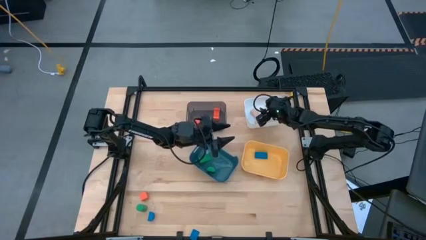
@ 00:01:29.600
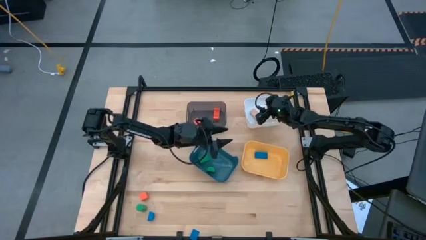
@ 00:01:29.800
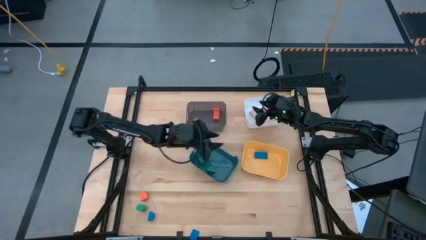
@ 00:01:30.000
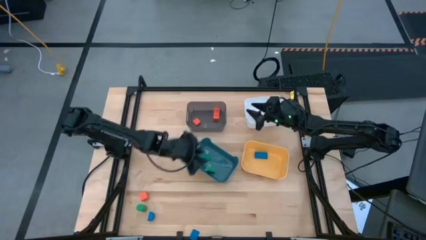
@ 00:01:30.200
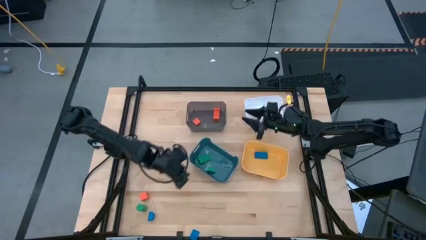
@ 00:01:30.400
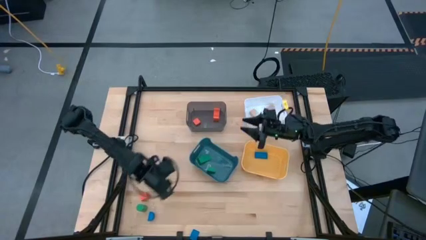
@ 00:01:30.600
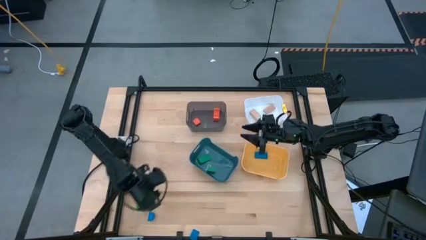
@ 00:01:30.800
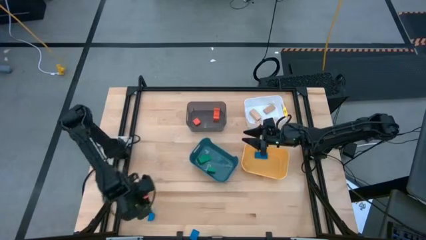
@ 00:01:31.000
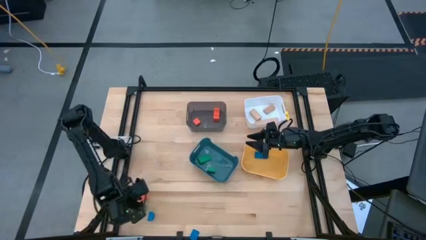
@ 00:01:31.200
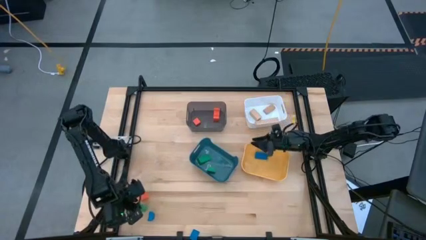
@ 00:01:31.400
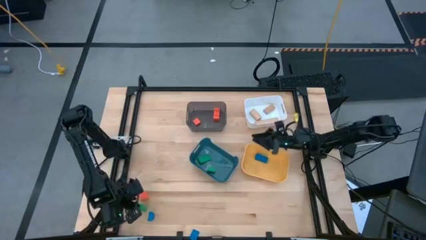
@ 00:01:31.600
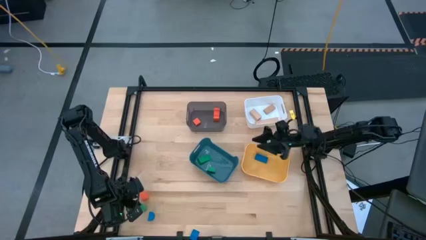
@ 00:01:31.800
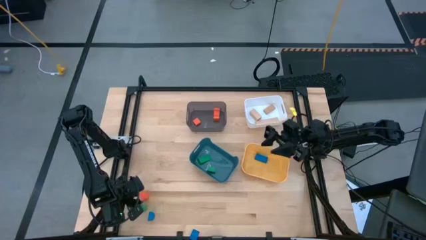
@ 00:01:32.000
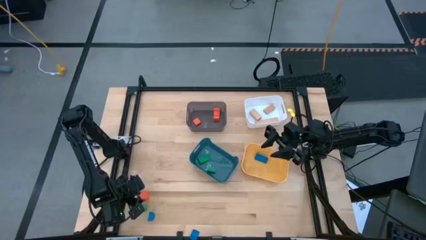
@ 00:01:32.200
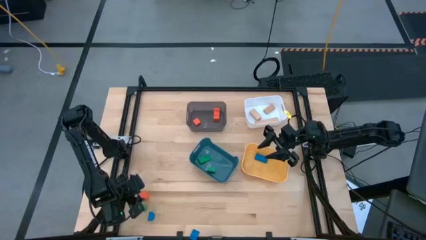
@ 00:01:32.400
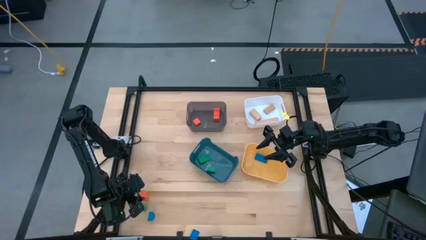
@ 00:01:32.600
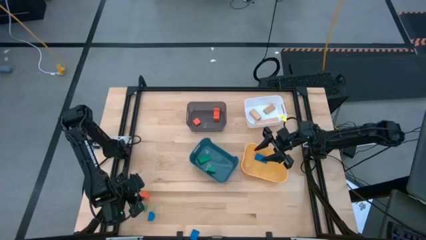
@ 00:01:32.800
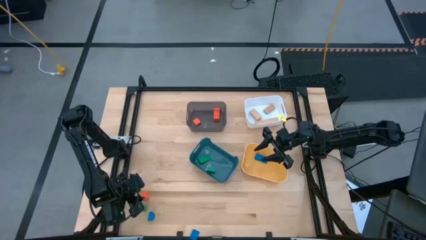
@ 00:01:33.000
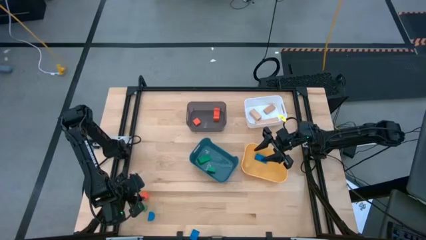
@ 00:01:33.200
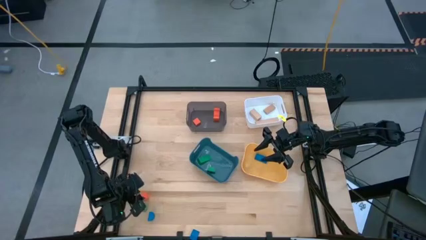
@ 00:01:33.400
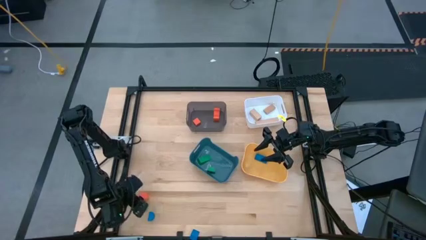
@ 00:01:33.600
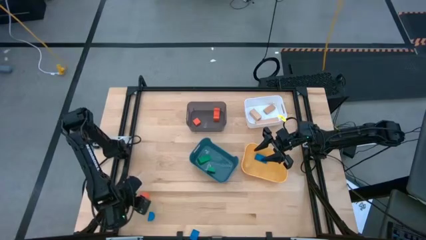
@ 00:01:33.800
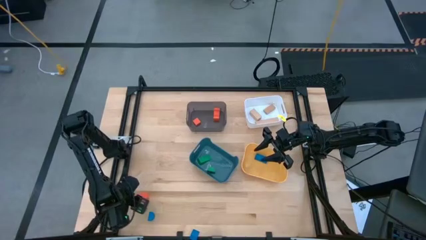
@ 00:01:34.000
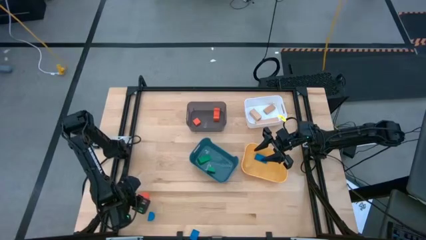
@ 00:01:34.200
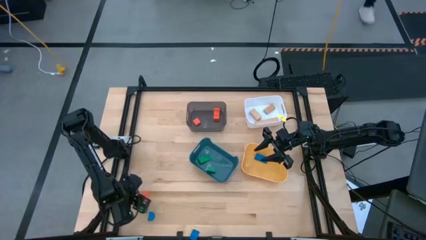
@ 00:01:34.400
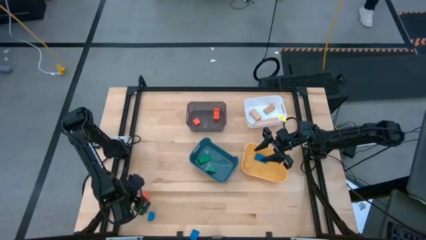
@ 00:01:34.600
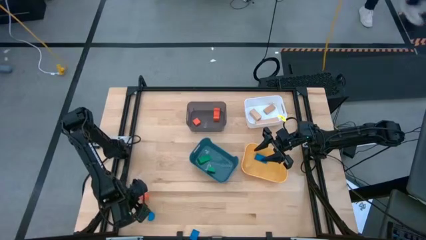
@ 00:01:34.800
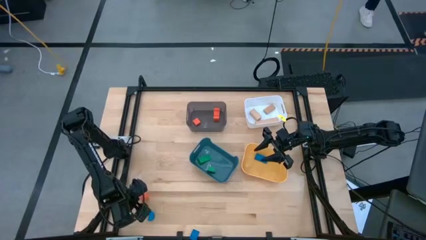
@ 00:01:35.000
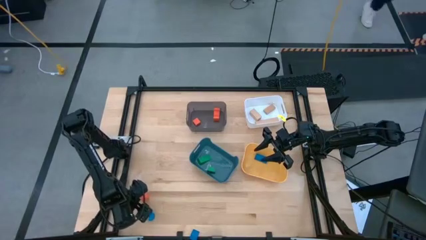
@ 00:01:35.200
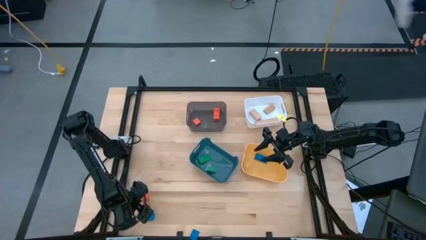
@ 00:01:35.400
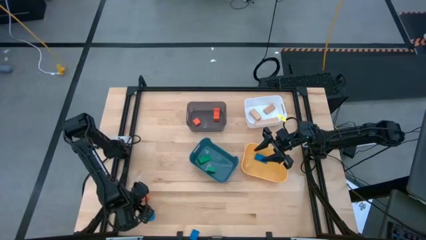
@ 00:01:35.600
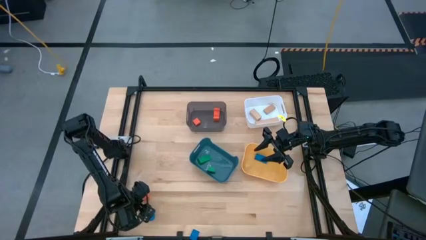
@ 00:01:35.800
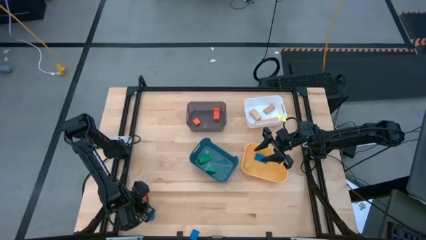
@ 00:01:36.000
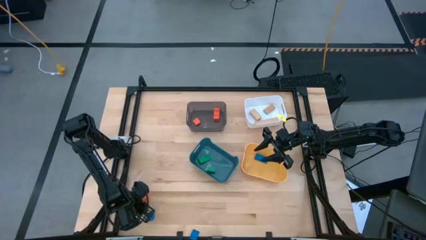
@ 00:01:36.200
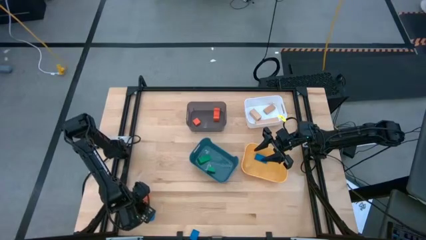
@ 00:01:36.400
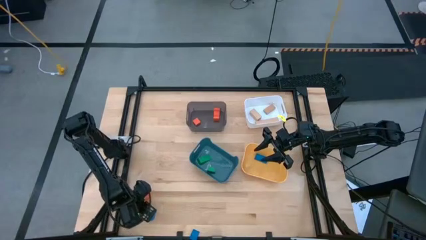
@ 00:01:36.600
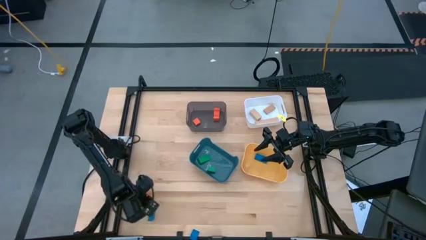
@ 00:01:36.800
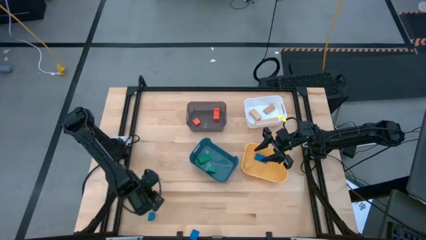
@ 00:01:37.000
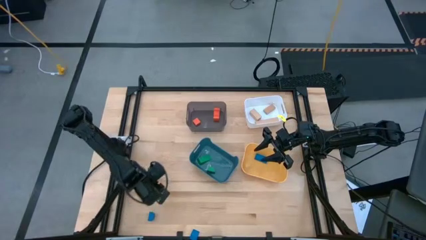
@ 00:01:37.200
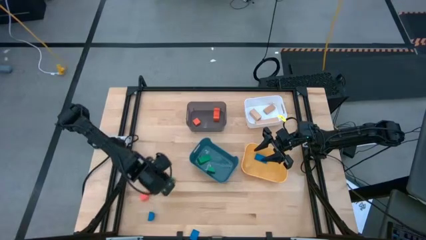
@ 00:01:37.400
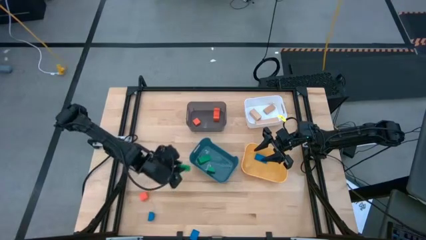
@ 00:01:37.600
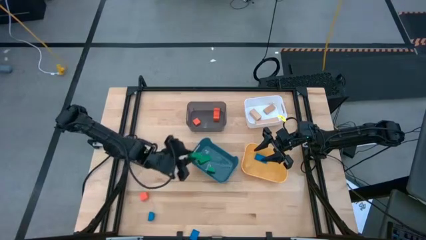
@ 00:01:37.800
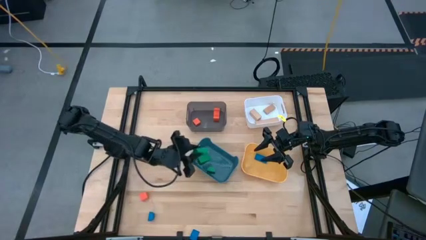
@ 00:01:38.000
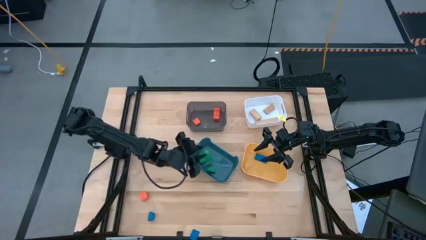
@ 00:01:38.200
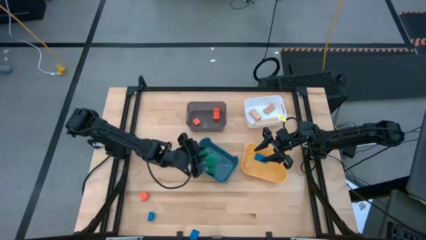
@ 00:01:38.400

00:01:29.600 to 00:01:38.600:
Task: Sort & place blocks by color
Put the green block into the blue bin

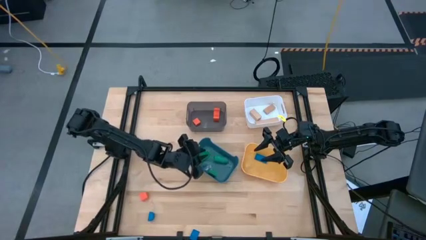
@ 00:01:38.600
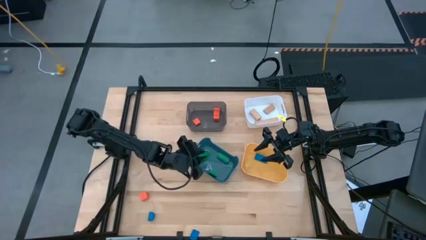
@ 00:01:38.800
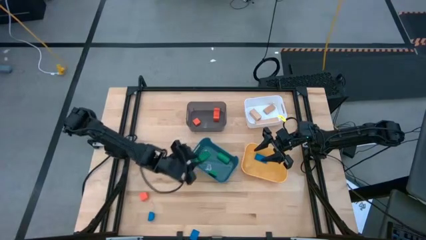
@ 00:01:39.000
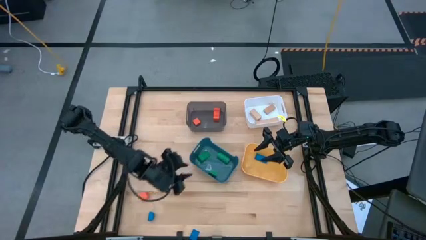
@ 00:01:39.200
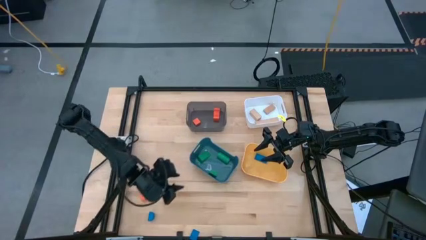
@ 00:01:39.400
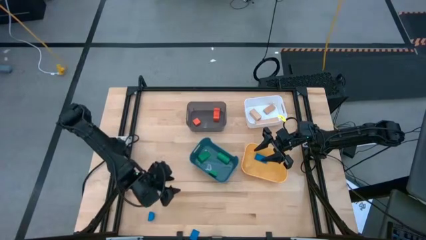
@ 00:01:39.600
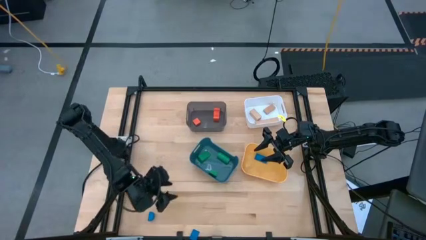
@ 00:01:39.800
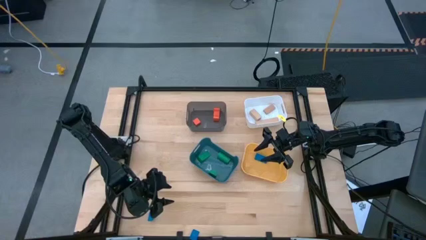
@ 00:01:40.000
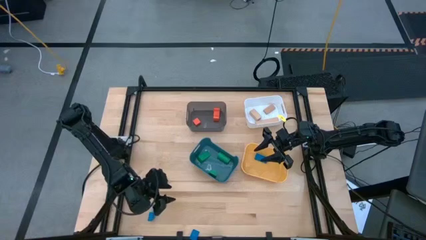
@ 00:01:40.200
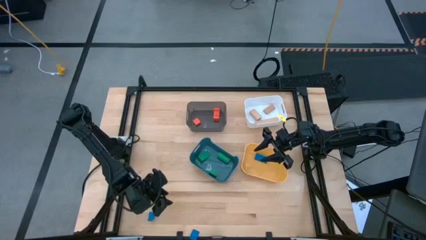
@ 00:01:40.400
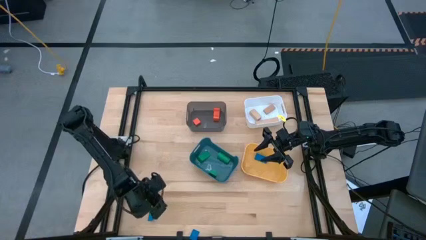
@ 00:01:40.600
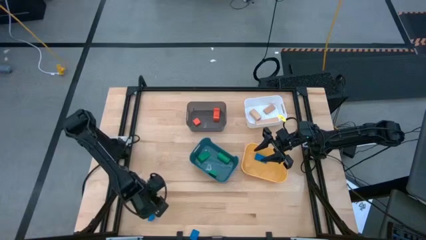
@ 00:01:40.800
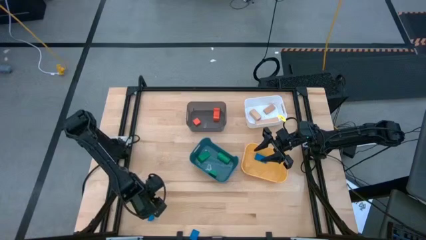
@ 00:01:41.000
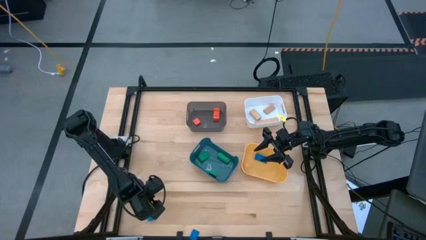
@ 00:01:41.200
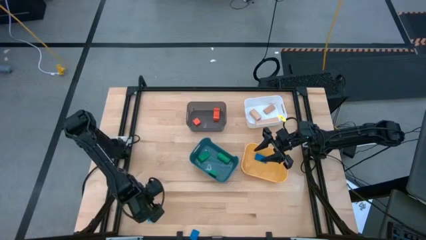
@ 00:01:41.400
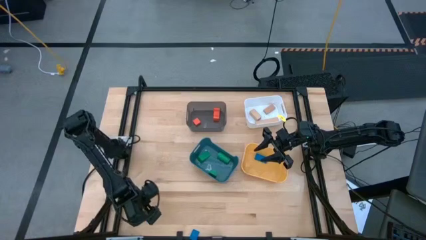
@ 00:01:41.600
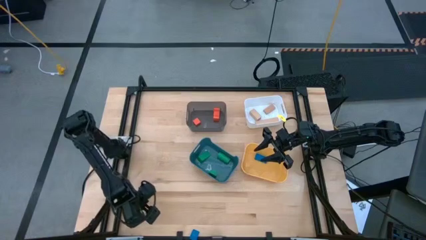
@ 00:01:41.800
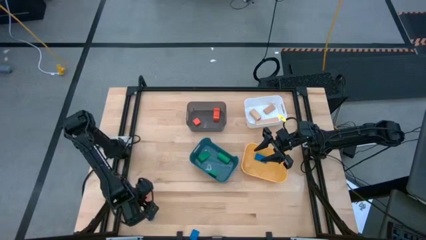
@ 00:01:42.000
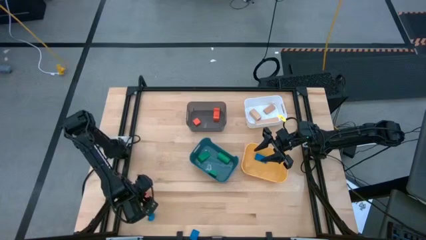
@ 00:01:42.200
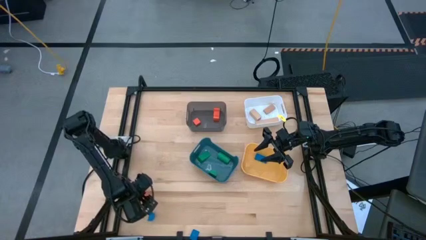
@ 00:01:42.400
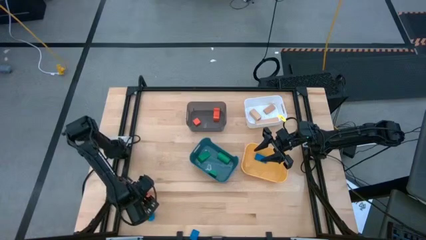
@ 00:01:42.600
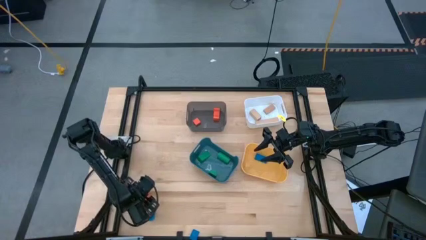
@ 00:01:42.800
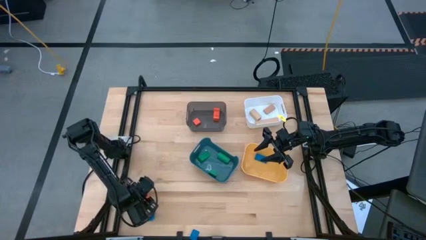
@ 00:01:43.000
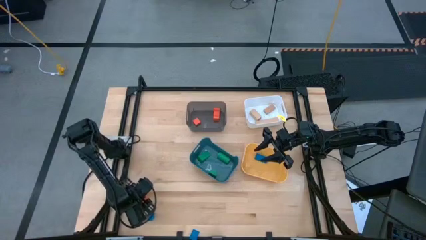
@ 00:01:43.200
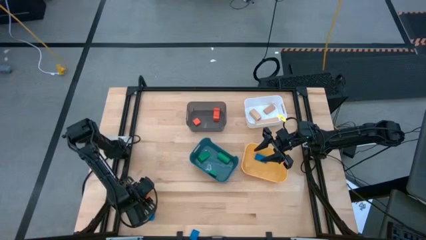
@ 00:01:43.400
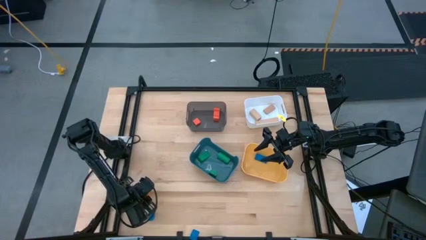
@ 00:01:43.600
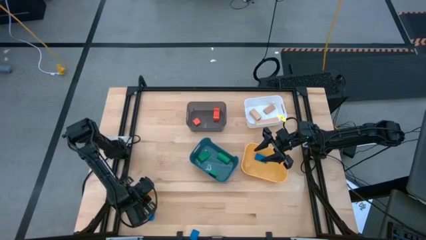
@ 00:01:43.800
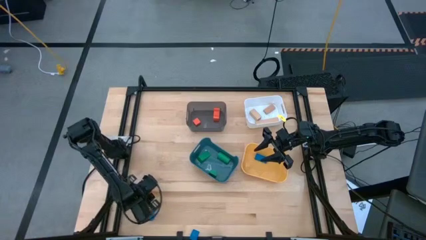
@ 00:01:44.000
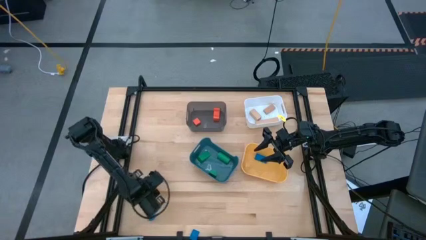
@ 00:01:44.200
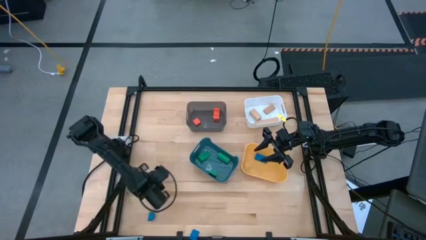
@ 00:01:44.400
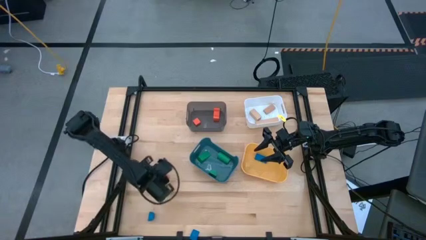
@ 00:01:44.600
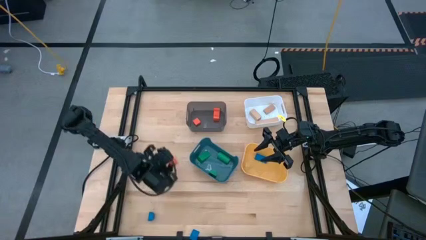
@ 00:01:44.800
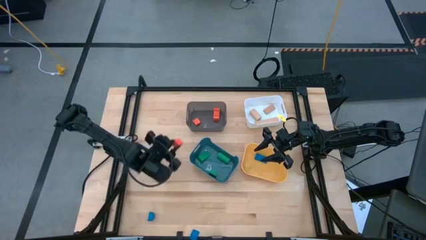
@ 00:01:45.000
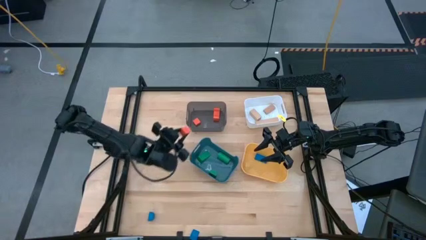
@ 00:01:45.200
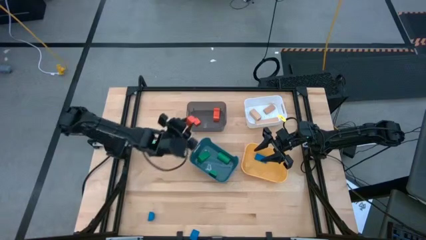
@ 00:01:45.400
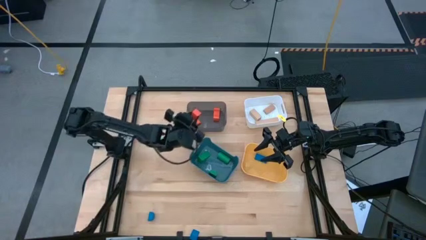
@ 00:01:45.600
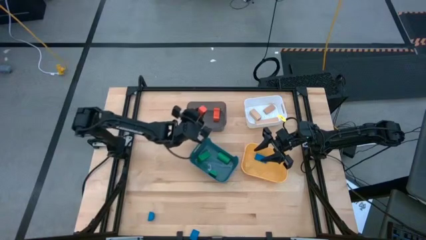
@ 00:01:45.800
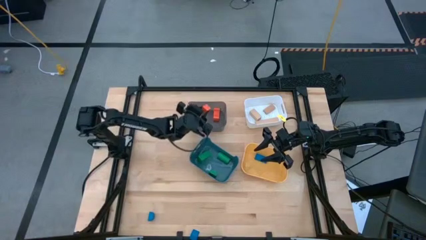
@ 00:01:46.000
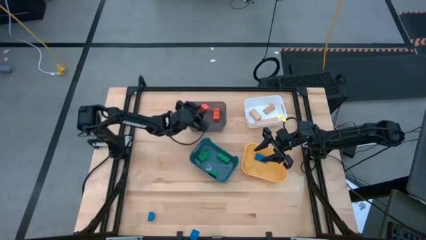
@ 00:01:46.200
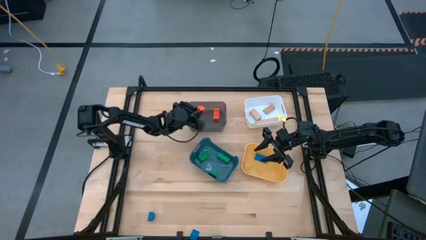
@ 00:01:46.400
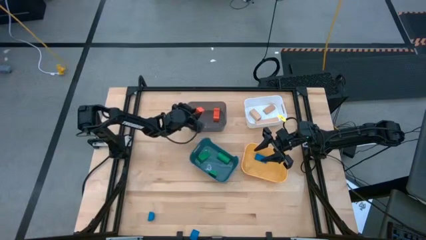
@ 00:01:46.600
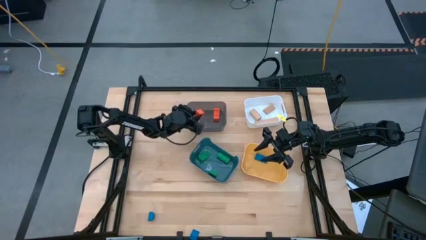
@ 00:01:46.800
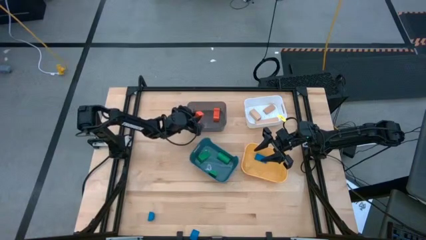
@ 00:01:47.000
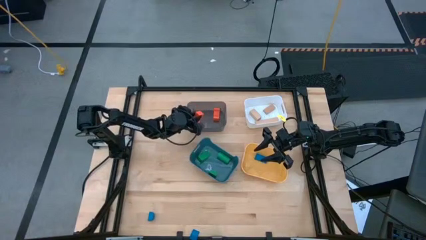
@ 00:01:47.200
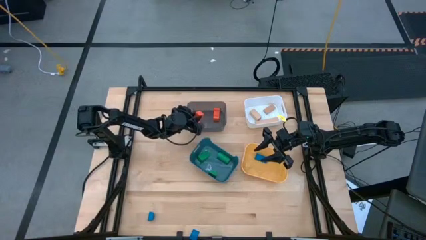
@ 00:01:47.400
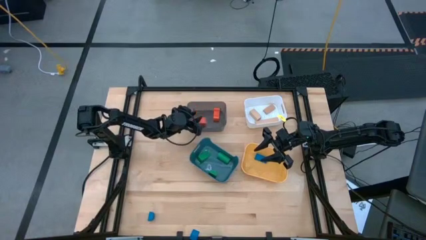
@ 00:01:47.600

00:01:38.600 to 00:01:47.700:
Put the orange block into the transparent black bin
